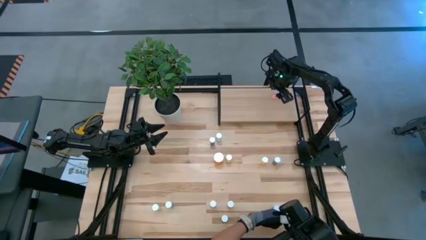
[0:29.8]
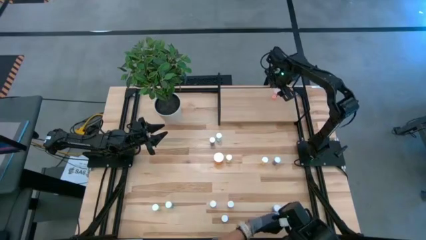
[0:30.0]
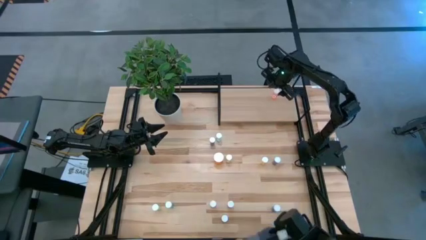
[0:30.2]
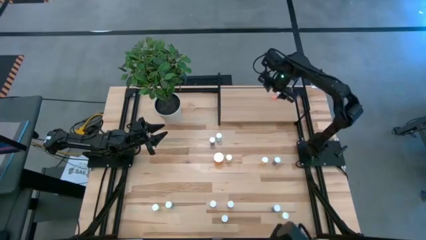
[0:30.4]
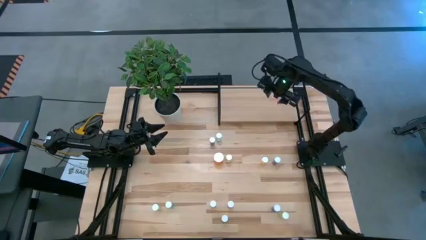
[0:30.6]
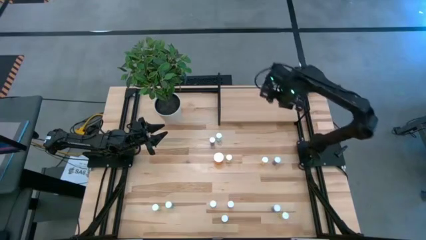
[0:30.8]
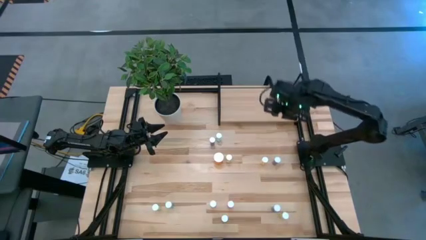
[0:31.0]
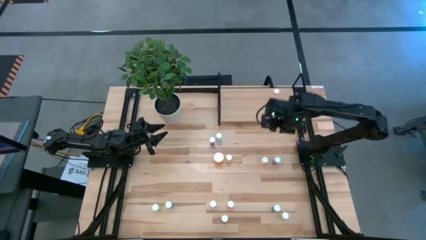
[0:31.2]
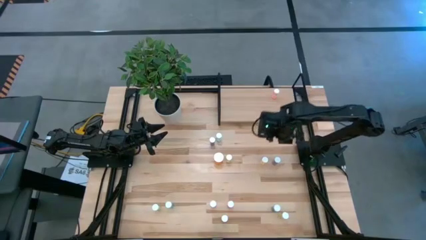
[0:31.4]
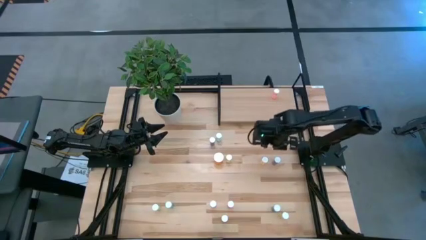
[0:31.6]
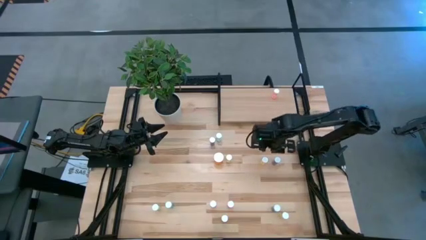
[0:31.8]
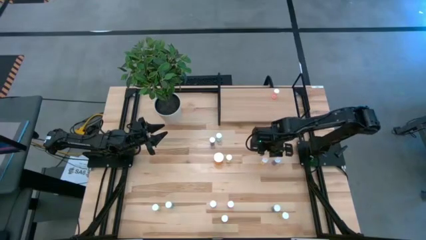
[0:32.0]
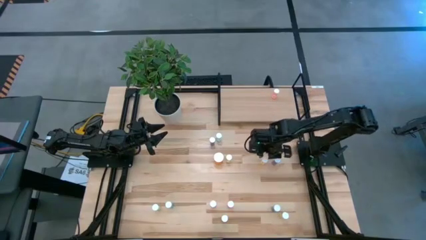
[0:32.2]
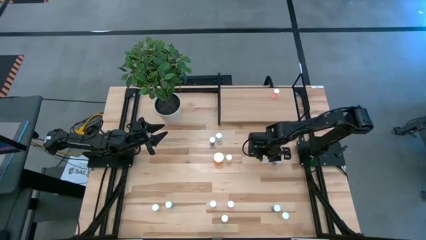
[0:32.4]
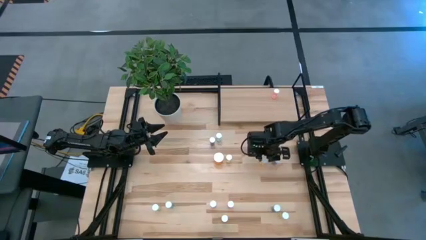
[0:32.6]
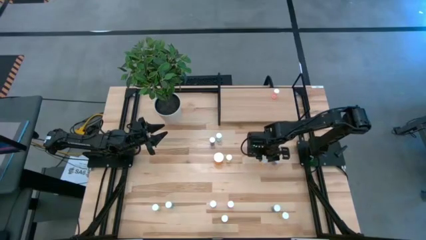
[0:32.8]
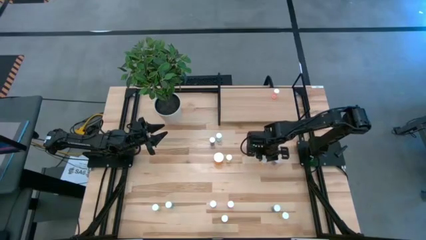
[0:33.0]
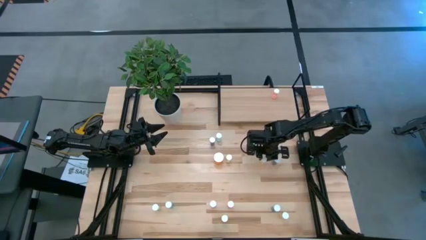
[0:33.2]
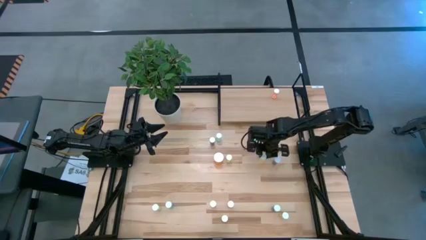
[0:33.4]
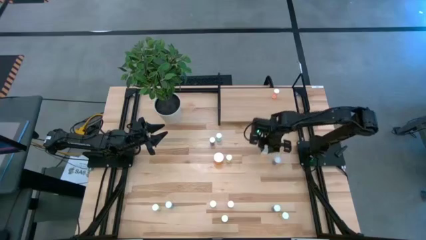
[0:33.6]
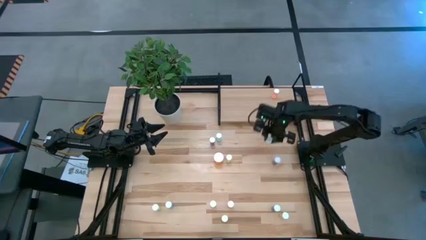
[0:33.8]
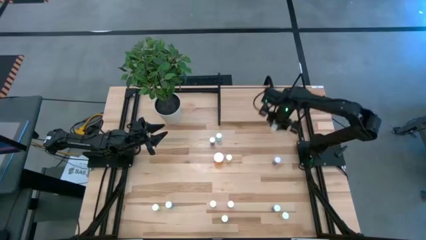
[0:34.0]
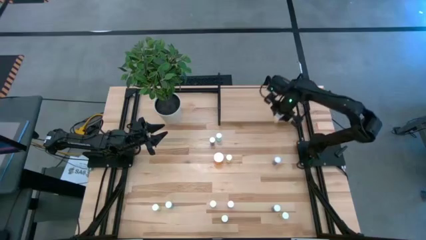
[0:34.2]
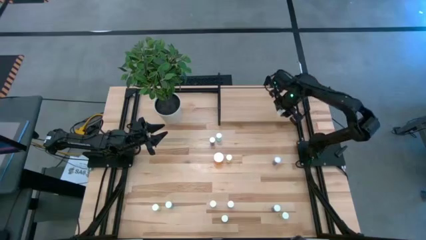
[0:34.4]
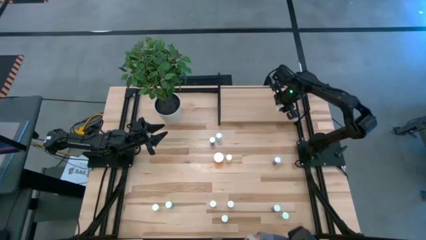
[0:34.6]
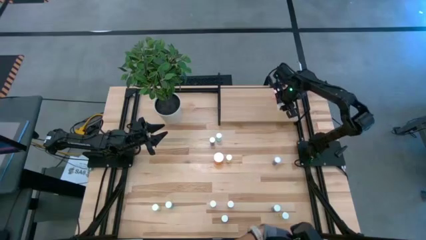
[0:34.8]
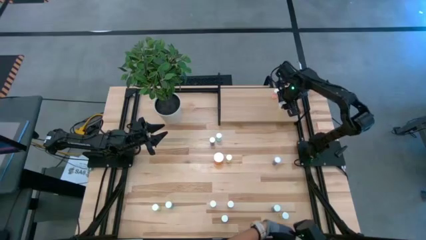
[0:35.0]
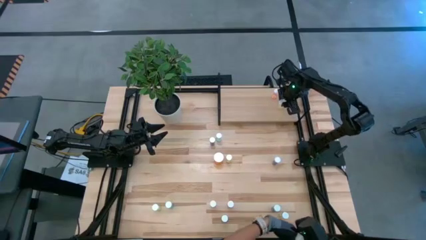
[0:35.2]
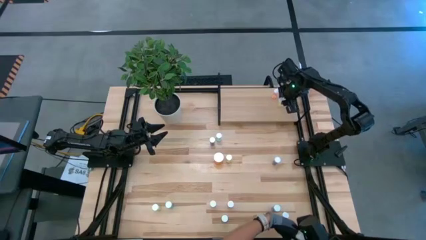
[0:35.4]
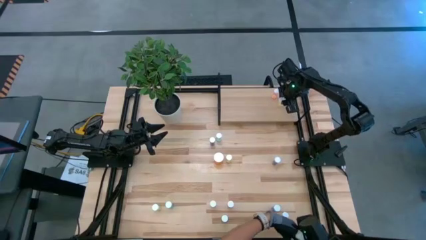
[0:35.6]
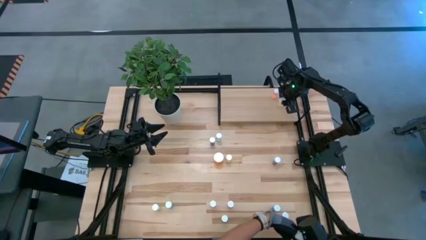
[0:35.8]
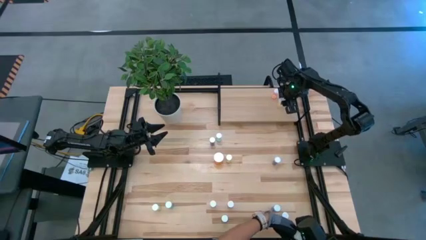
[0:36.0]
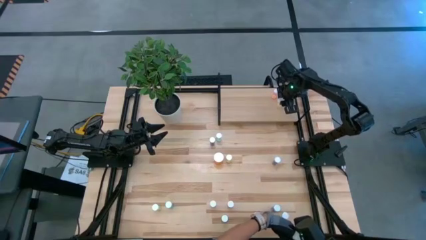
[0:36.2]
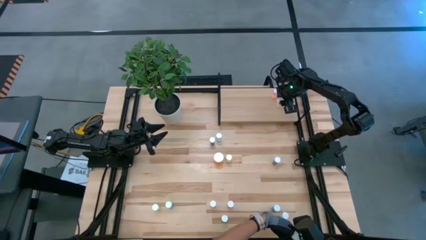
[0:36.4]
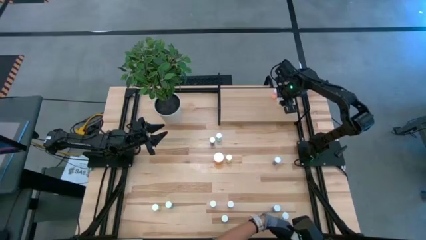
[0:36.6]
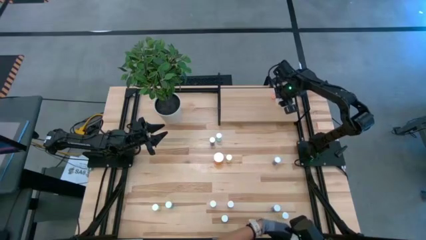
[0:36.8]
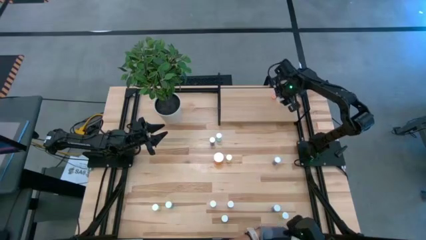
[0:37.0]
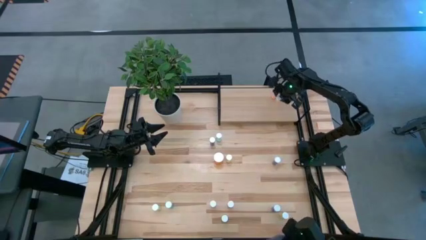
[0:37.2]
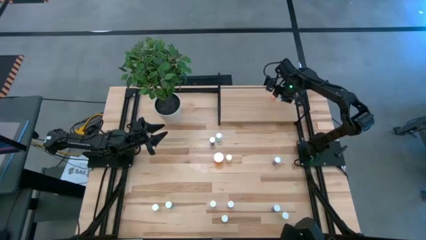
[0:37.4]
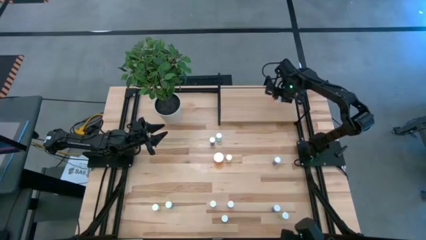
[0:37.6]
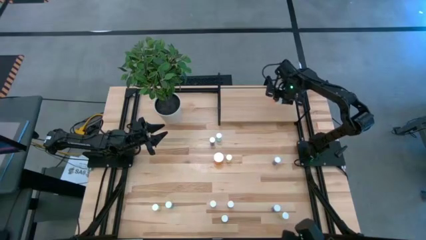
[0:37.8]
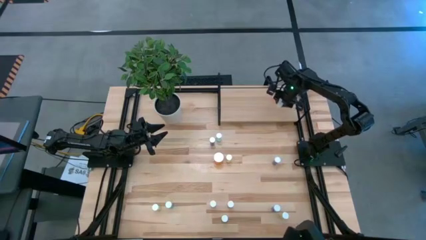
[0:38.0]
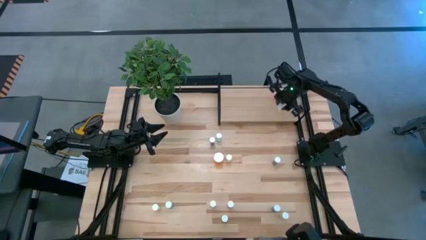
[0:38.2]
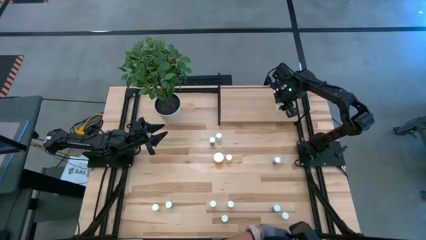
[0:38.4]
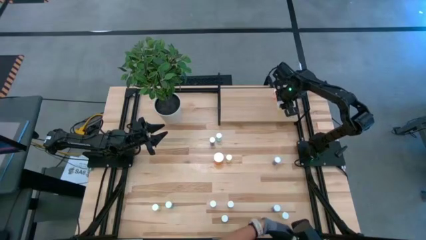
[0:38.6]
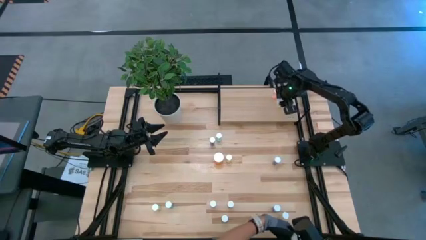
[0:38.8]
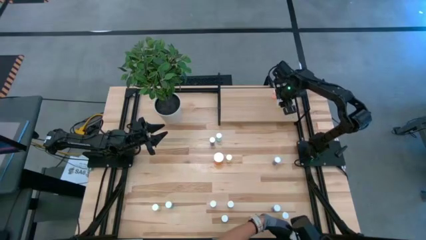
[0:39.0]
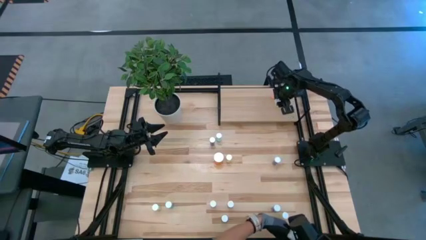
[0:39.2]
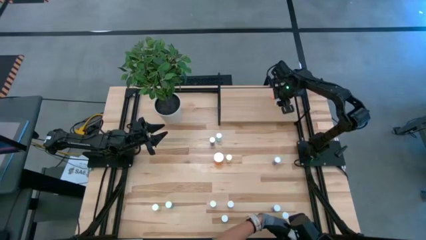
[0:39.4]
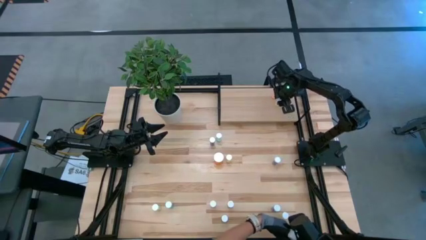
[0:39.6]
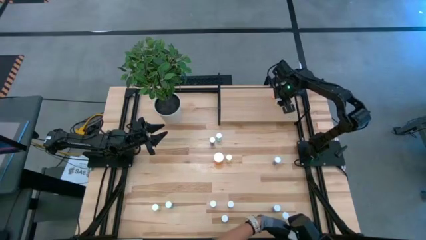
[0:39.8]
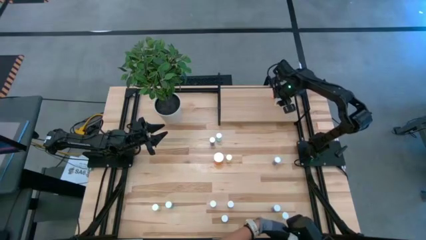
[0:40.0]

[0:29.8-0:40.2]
Task: Pick and place medicine bottles onto shelf by color
Put the yellow pill bottle on the shelf

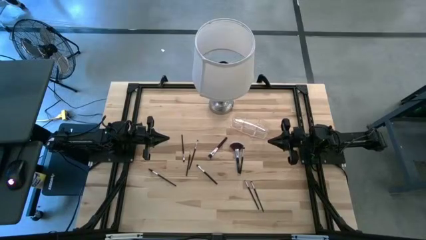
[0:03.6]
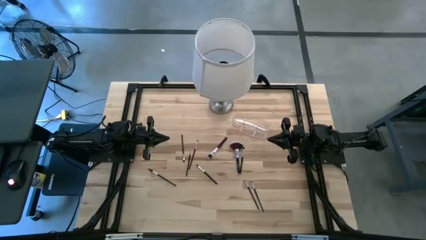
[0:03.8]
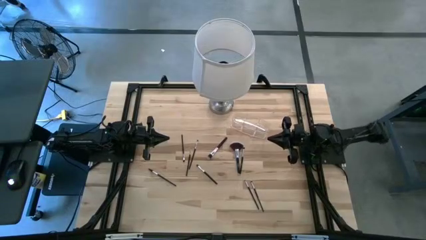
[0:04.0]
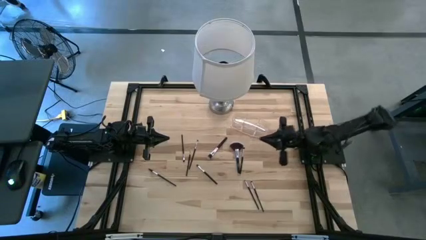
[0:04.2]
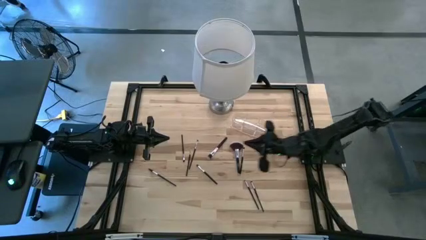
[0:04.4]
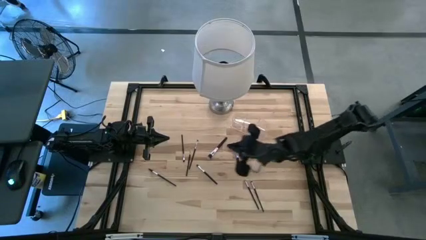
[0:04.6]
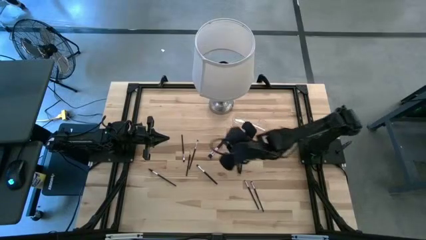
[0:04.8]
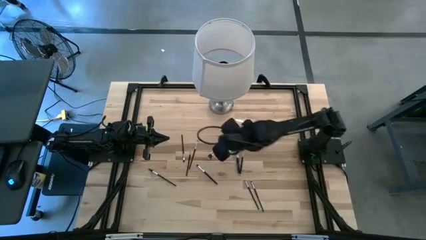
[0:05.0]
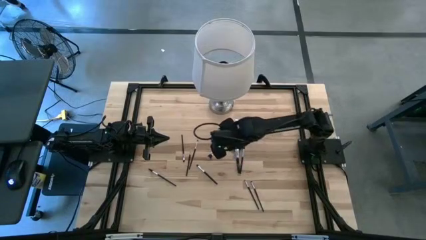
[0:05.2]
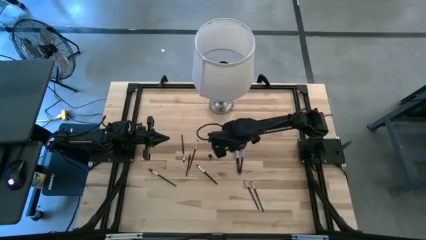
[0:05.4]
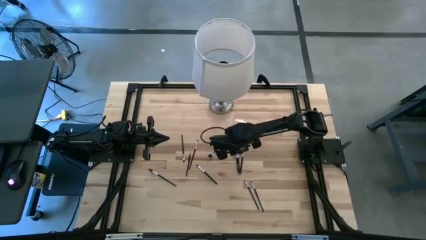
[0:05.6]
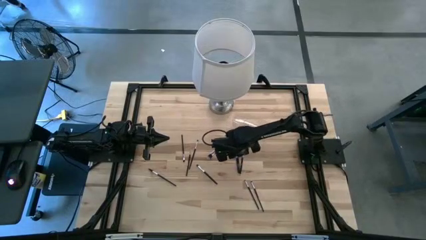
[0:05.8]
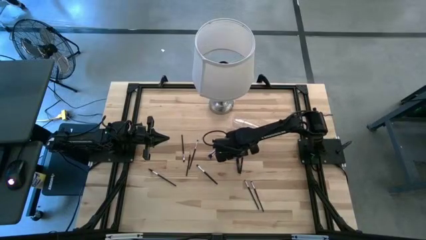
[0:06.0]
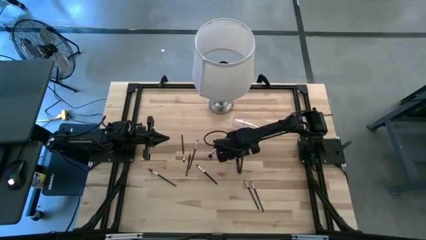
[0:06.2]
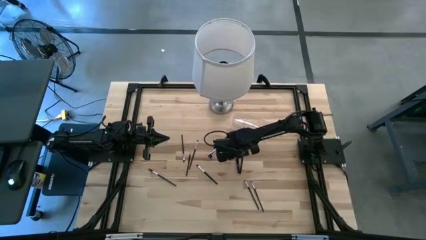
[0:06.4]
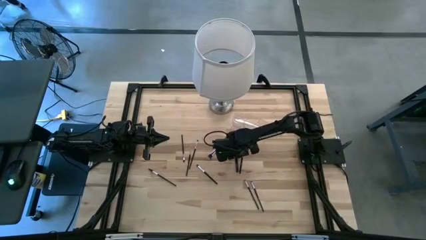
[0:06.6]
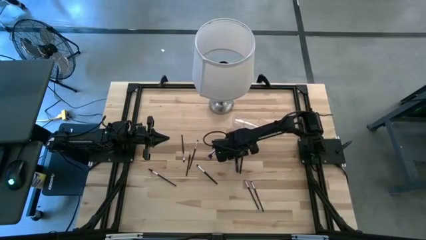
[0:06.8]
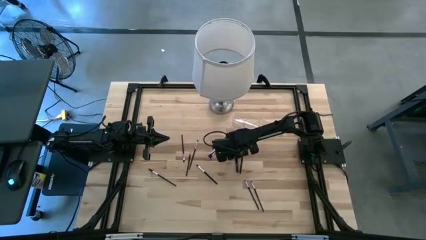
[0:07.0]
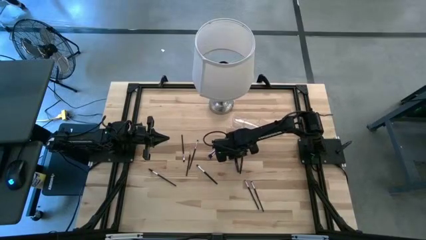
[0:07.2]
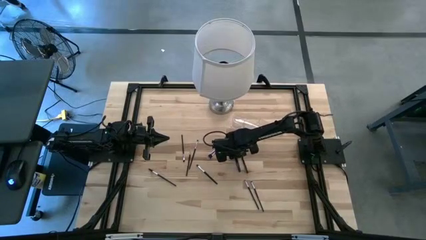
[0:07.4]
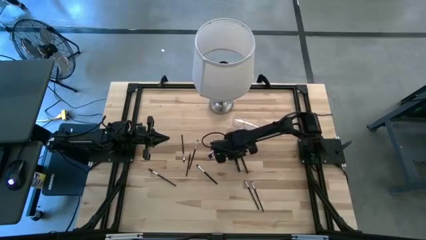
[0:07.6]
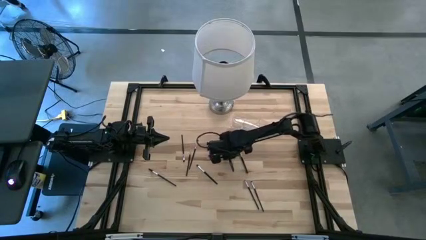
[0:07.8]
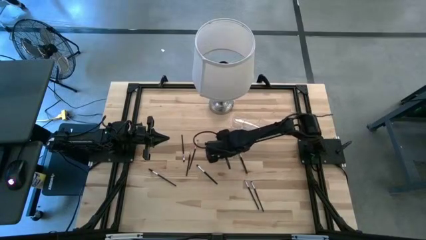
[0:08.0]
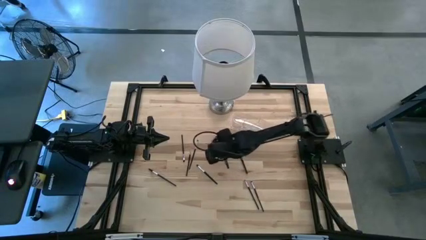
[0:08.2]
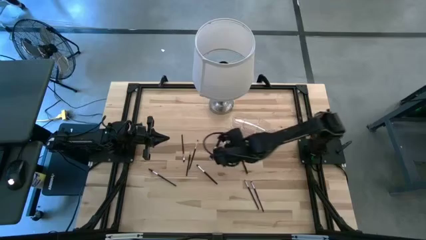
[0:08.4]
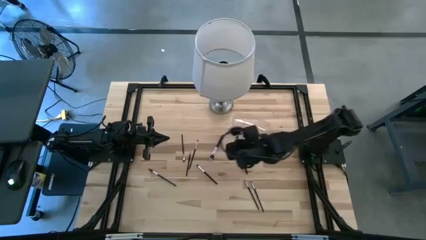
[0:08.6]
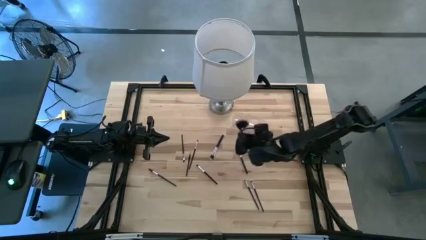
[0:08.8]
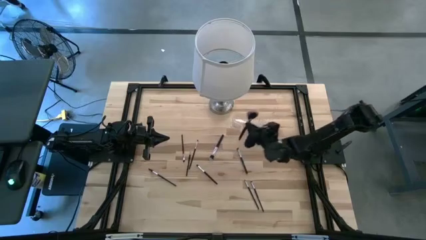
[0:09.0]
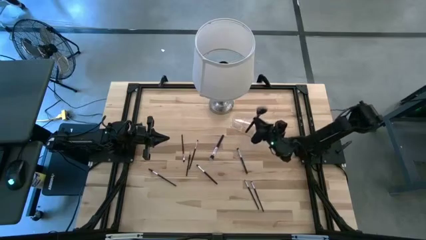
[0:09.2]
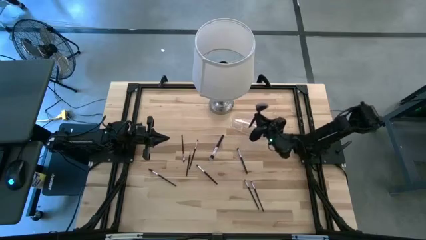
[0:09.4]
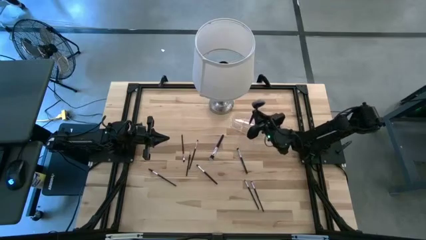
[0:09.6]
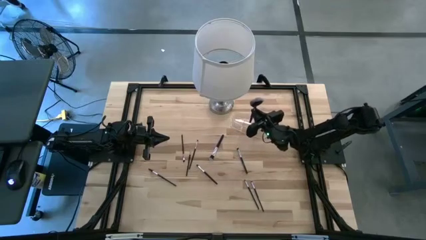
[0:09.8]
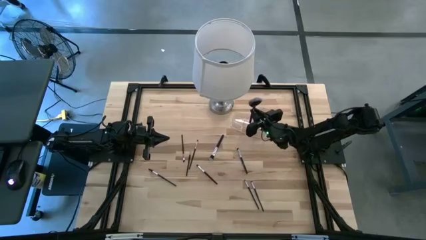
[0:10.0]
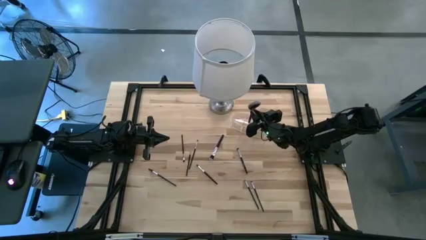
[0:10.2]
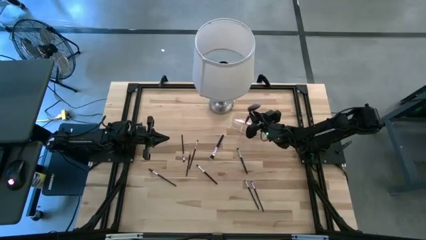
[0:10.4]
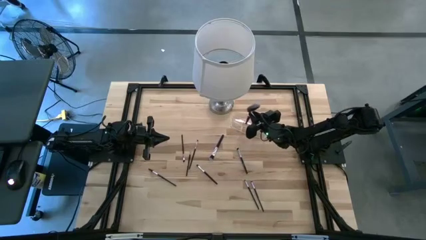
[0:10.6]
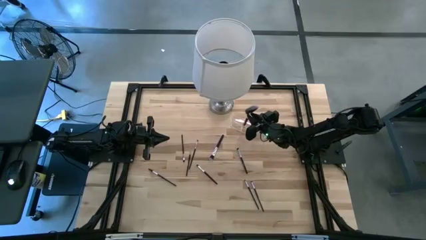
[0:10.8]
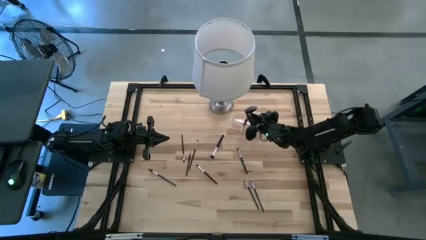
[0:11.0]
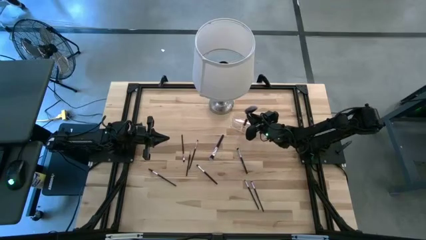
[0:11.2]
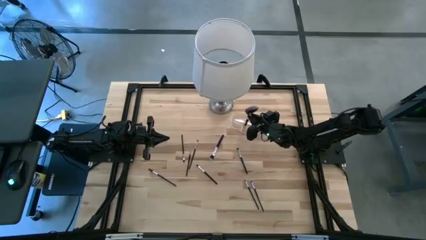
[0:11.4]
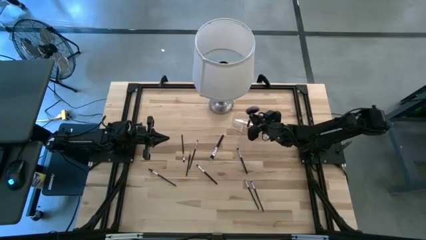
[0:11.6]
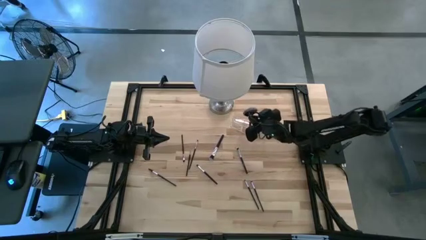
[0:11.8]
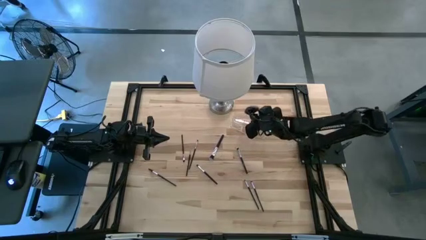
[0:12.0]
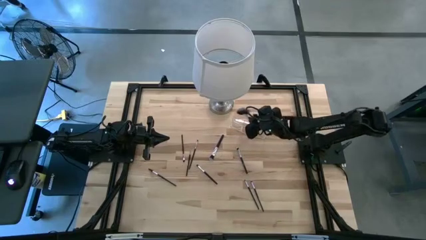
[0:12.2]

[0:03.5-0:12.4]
Task: Put items in baskets/containers
Put the black highlighter brush into the transparent organizer
